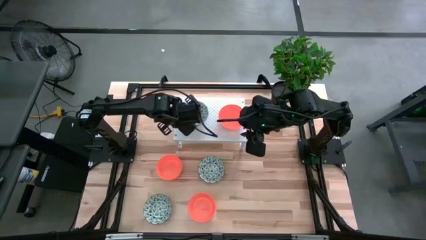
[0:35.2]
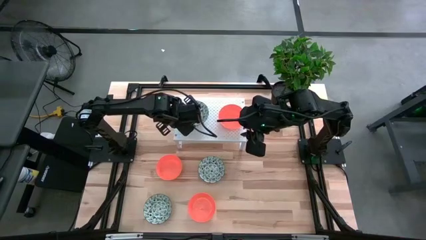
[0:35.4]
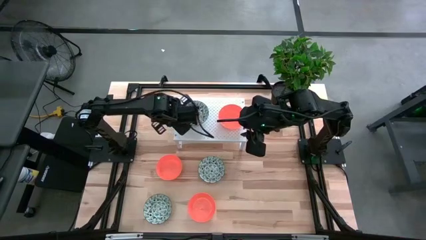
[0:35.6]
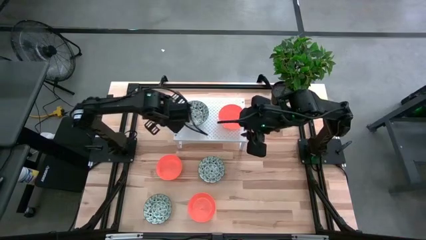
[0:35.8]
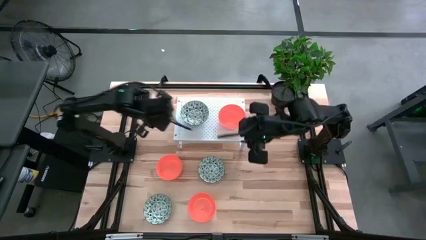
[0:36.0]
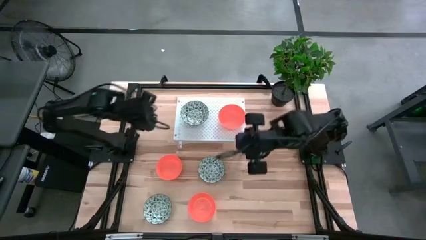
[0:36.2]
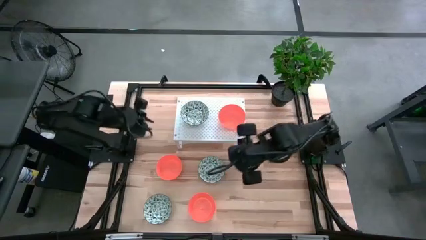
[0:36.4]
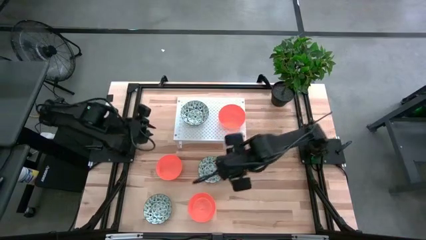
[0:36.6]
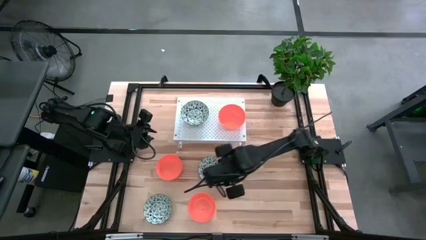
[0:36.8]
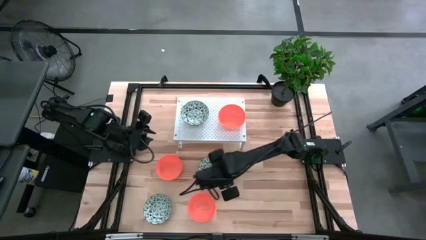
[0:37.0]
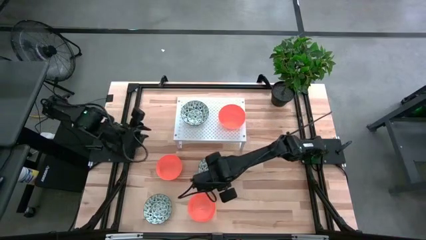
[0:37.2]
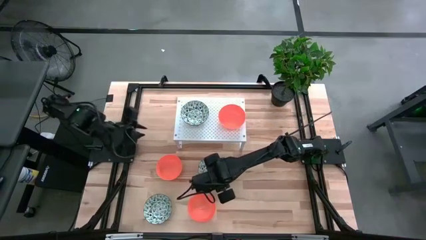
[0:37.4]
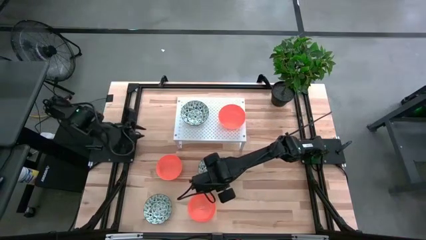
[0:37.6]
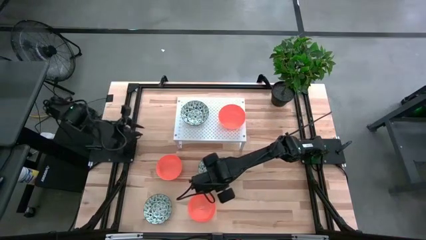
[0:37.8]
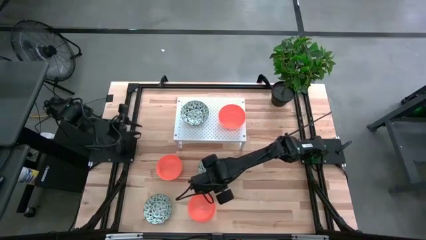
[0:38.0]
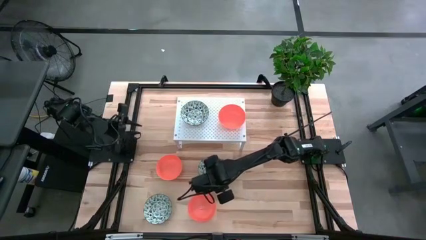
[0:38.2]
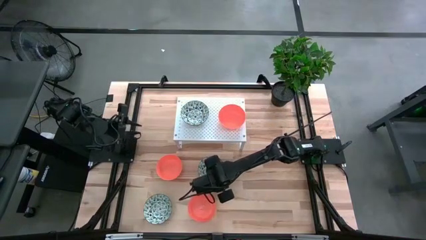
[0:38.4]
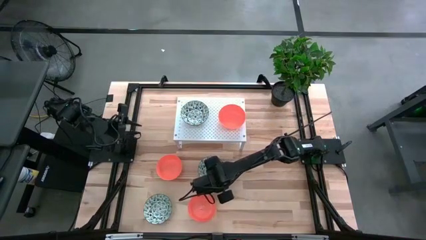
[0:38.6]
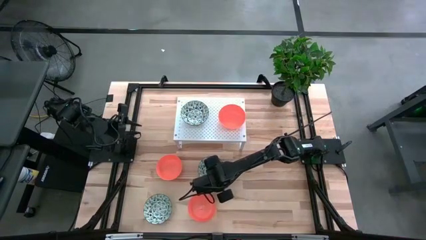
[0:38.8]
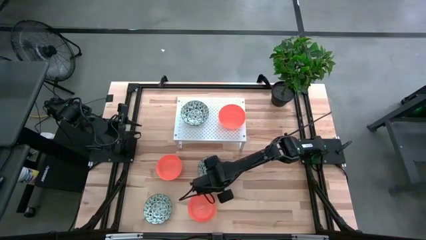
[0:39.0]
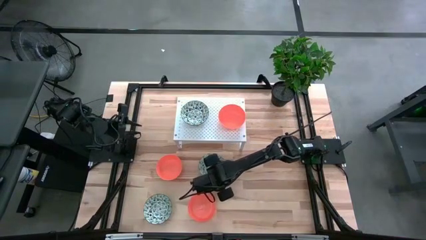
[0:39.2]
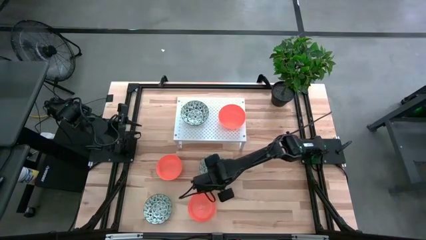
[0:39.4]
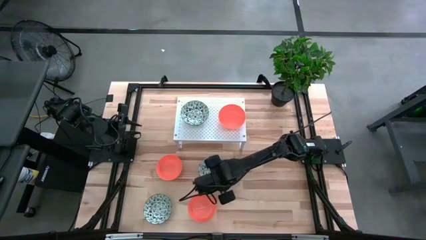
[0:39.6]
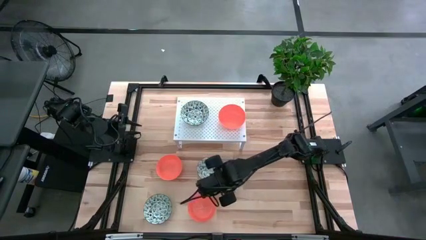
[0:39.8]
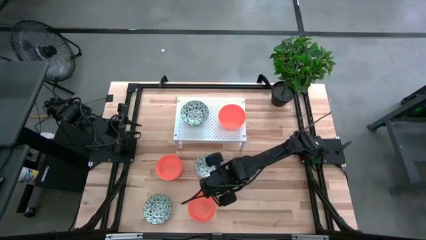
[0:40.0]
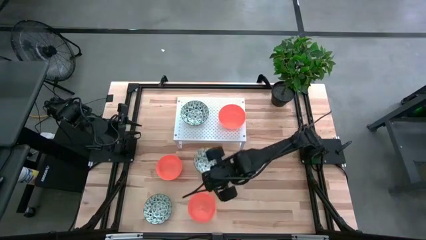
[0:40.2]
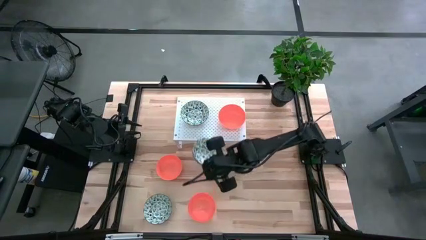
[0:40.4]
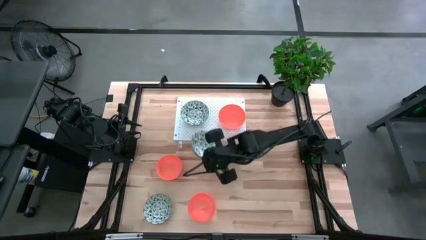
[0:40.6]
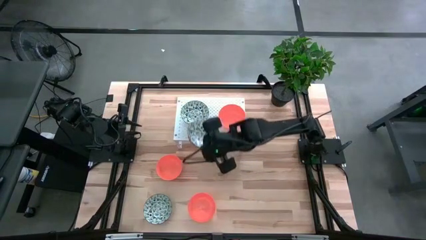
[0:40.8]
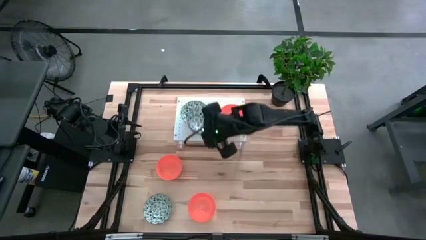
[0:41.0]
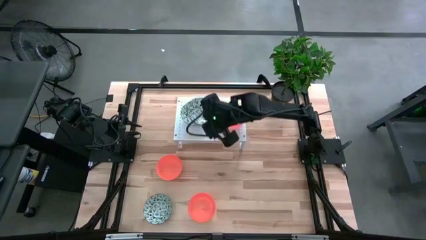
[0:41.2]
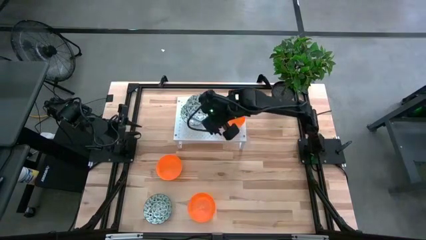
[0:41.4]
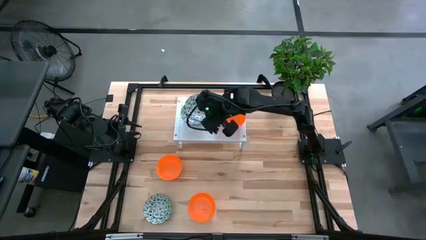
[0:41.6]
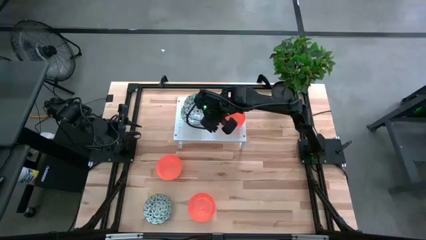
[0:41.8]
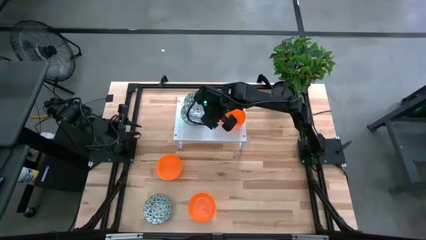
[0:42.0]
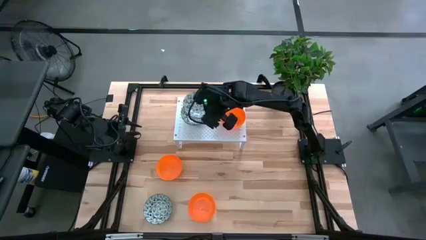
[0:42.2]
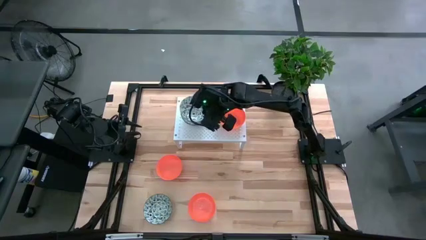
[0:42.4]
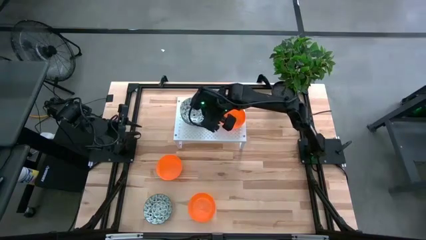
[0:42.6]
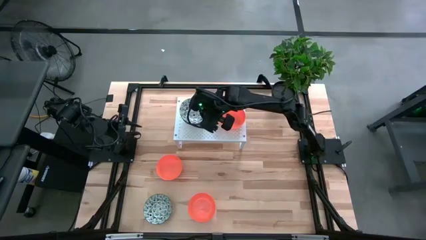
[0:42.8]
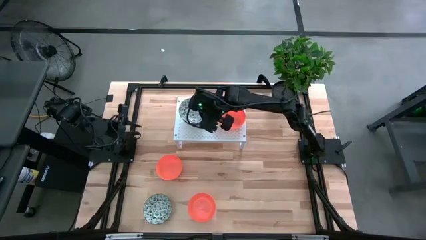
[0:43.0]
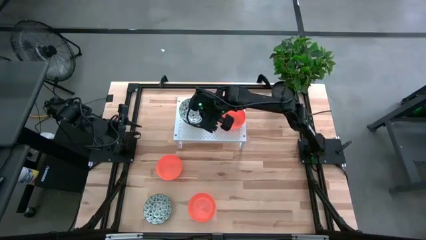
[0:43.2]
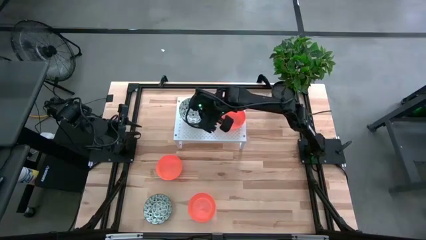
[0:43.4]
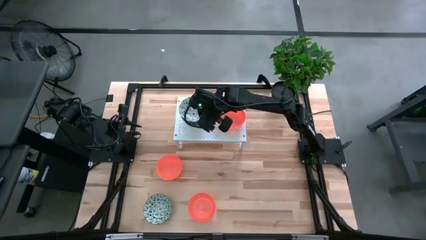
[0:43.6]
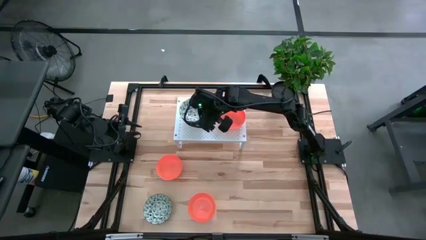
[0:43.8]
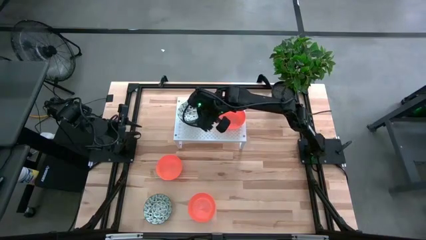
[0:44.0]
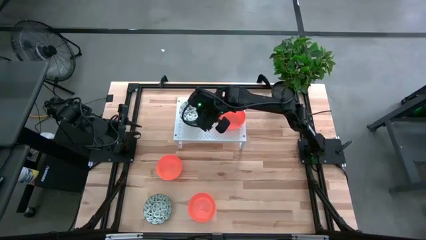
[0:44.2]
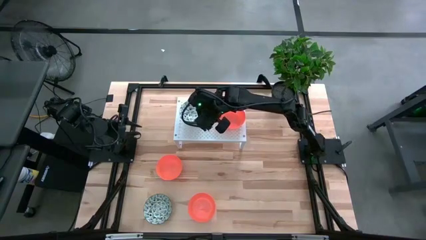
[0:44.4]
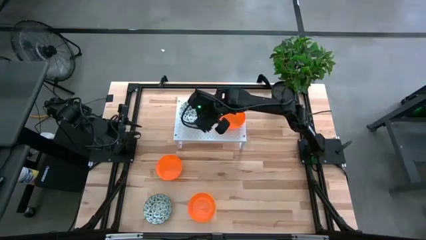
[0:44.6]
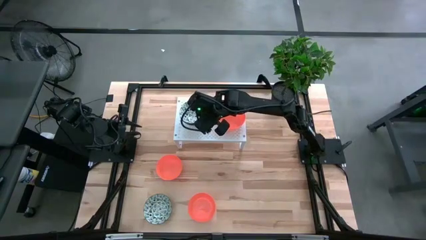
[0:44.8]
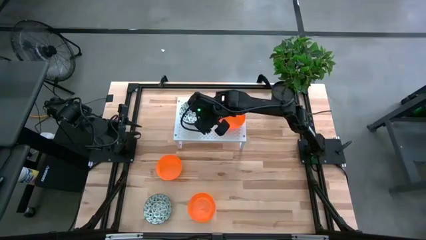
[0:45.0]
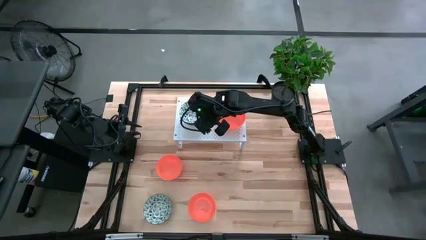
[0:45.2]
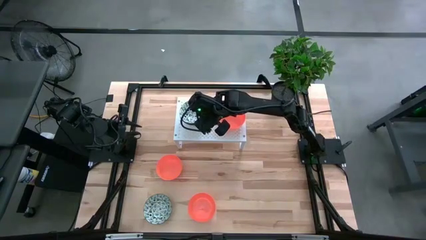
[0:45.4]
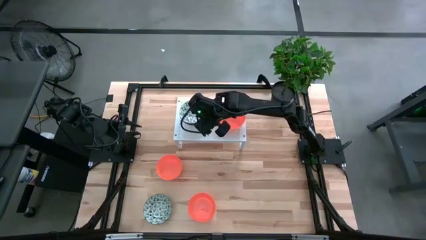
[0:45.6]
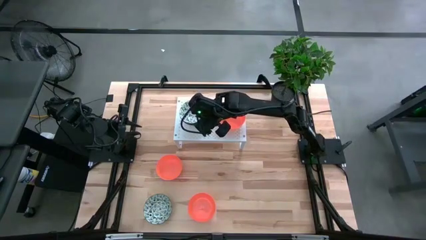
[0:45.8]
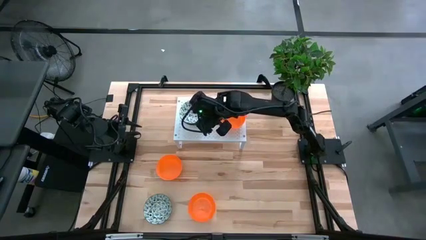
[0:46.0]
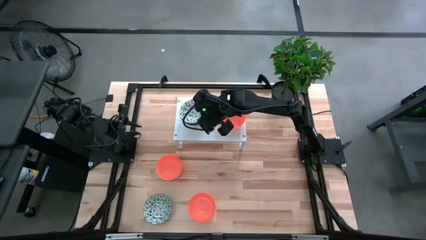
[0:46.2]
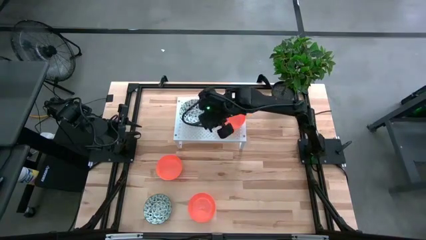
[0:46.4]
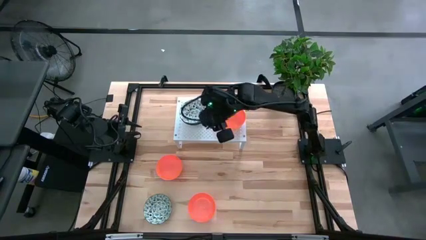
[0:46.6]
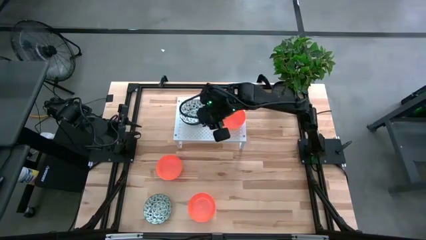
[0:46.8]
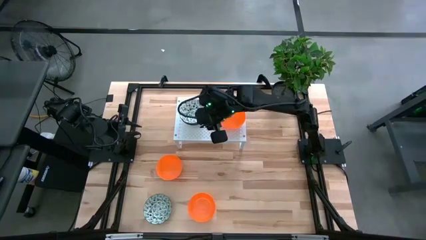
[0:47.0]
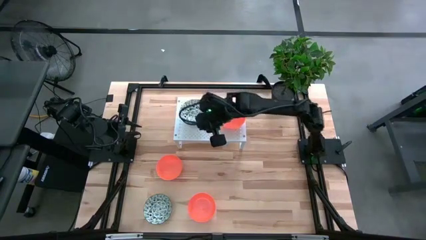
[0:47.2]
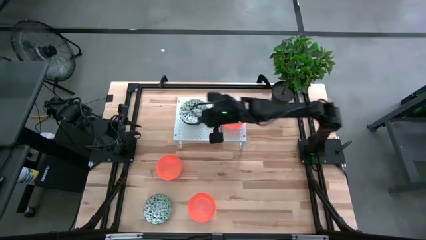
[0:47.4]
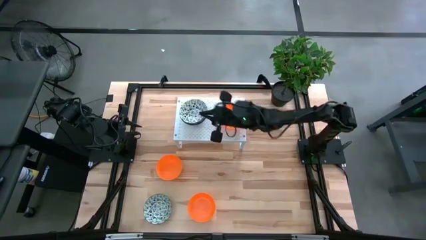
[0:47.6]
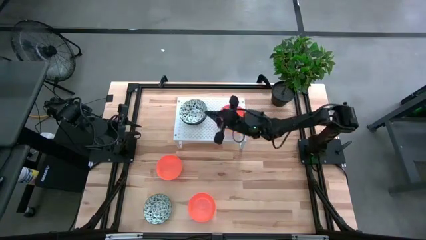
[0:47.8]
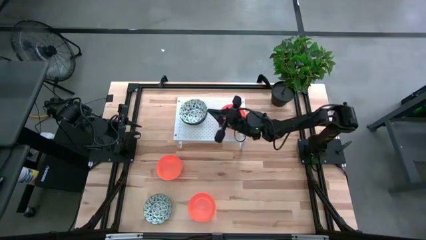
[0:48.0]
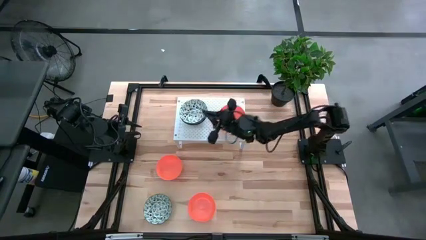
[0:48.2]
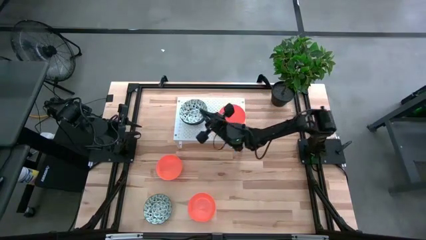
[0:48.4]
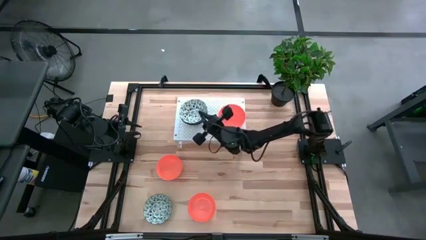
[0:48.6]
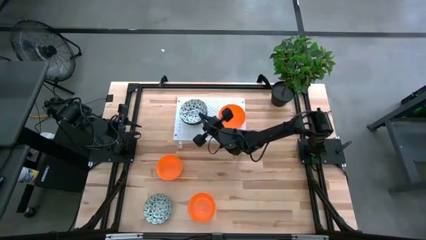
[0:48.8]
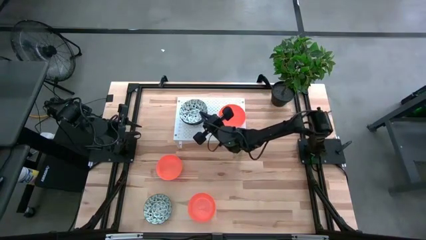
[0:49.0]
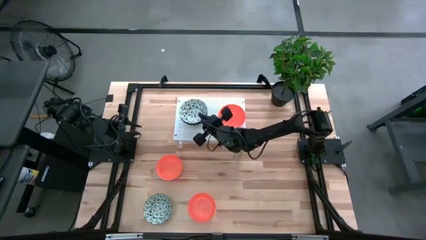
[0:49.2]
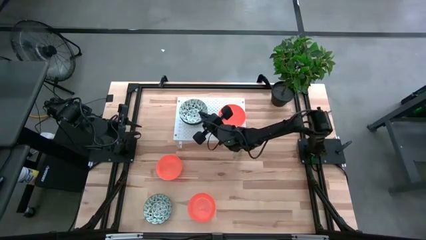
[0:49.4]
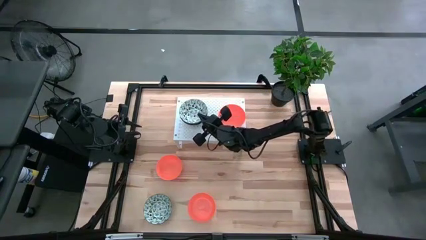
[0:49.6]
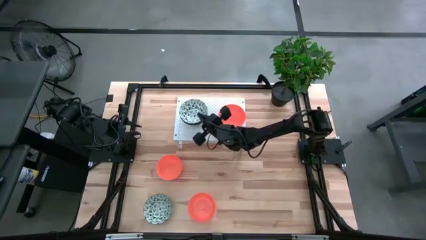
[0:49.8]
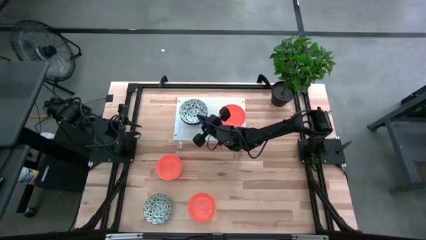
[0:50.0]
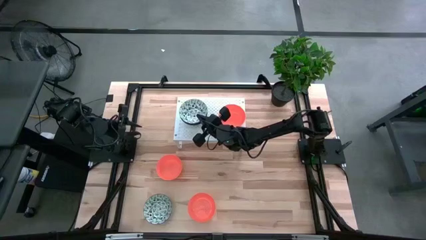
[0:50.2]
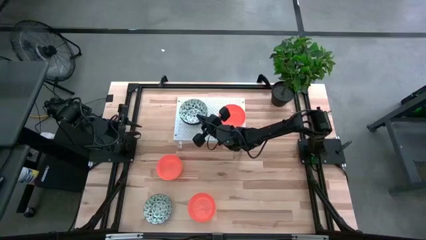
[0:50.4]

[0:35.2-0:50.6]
Task: Pick & Place Mini bowls
Stack the top green and white patterned bowl on top of the green and white patterned bowl on the shelf
